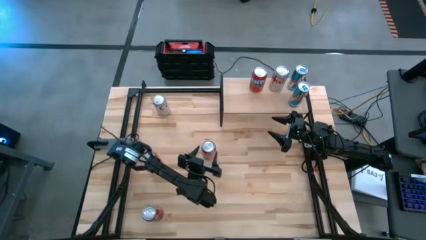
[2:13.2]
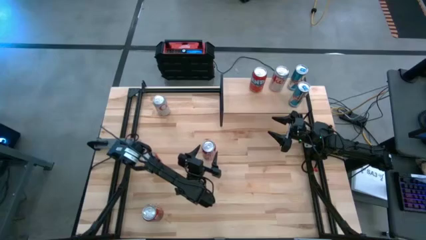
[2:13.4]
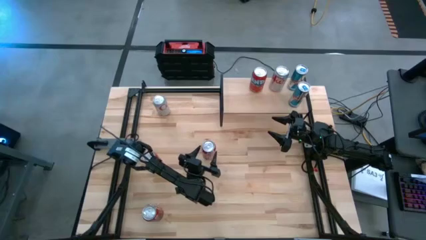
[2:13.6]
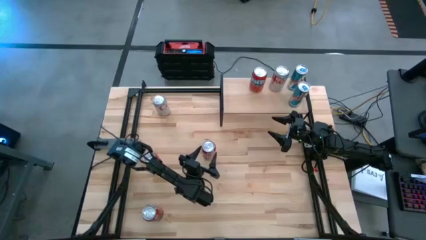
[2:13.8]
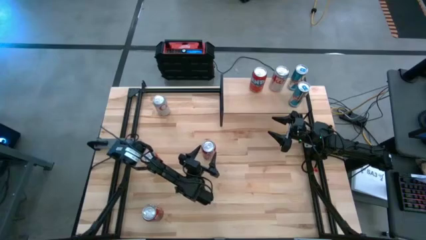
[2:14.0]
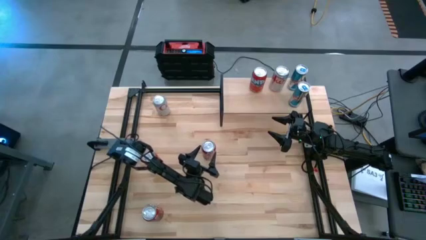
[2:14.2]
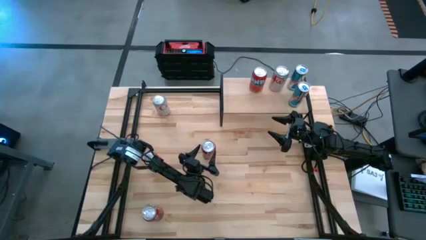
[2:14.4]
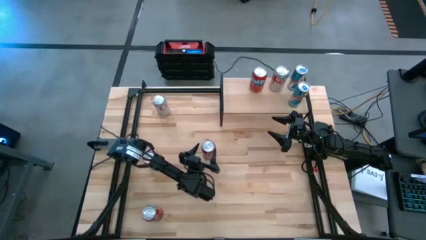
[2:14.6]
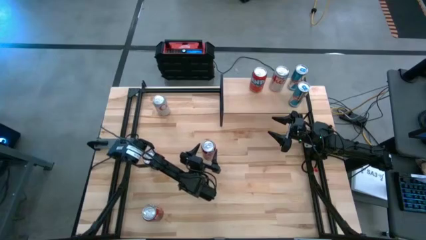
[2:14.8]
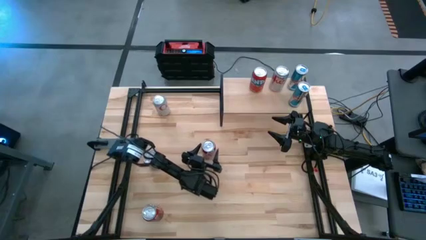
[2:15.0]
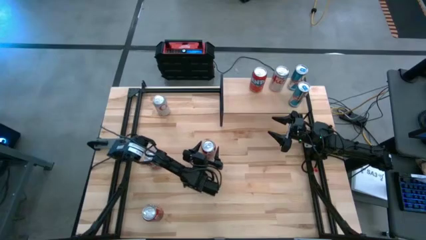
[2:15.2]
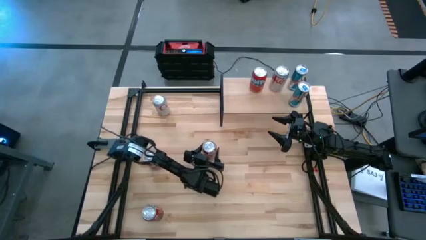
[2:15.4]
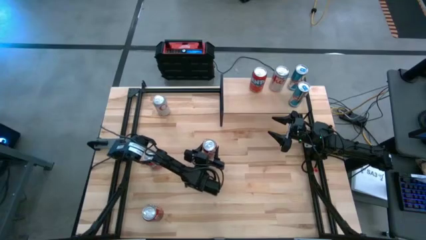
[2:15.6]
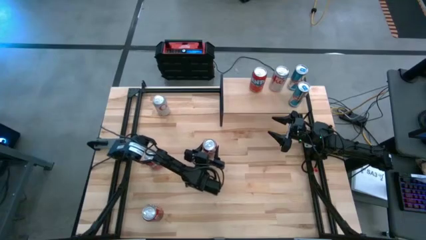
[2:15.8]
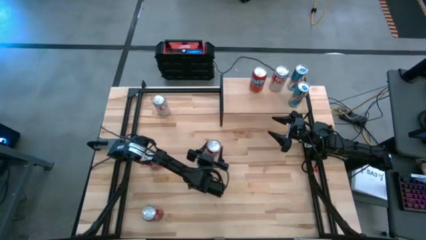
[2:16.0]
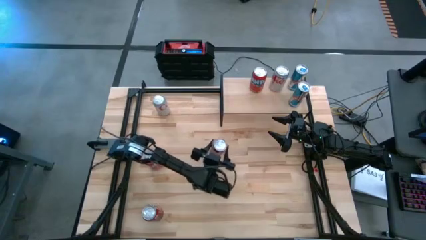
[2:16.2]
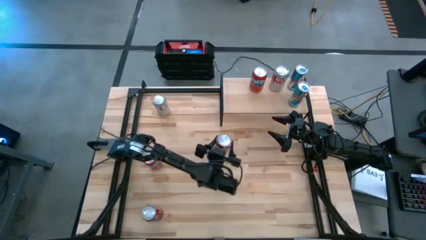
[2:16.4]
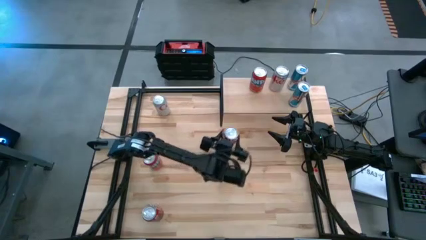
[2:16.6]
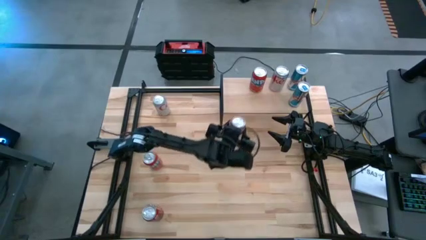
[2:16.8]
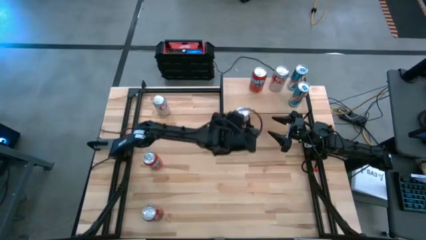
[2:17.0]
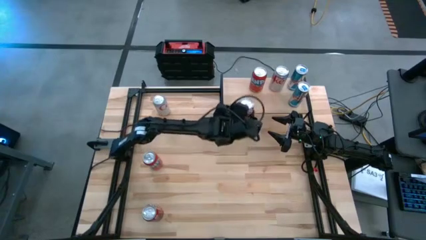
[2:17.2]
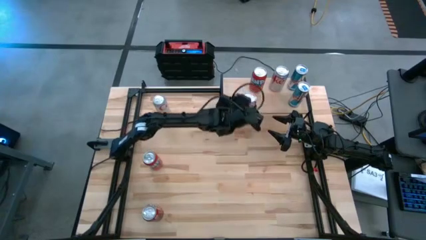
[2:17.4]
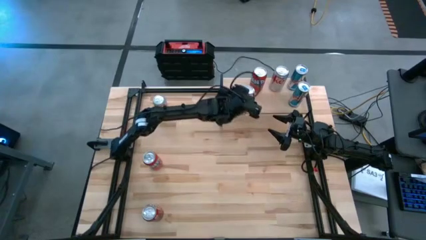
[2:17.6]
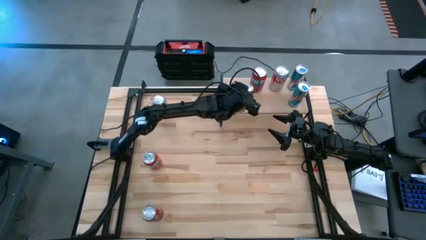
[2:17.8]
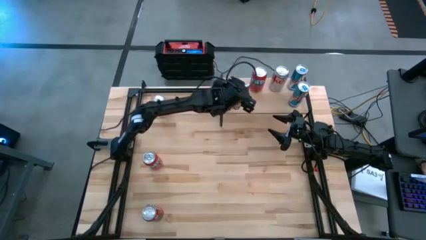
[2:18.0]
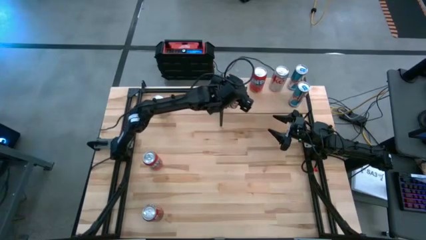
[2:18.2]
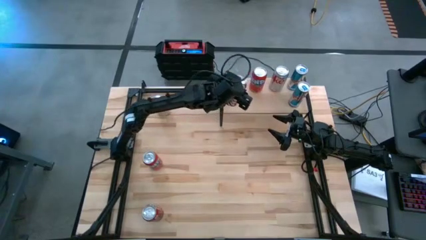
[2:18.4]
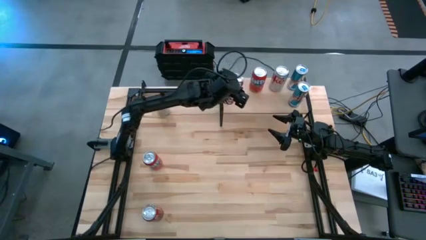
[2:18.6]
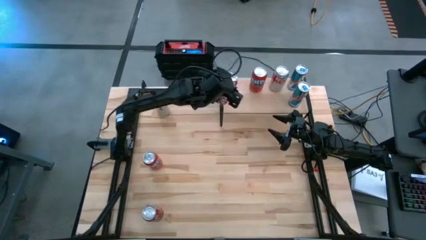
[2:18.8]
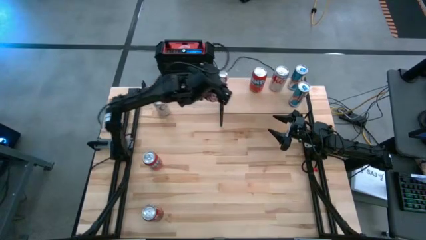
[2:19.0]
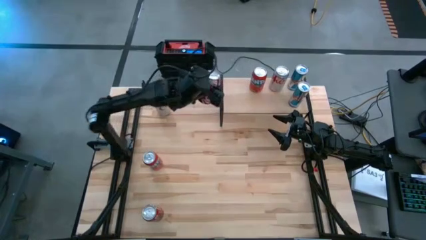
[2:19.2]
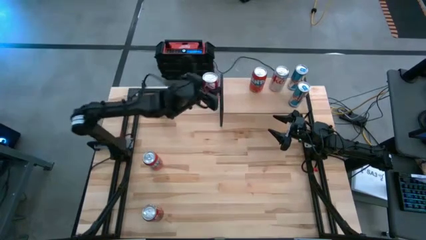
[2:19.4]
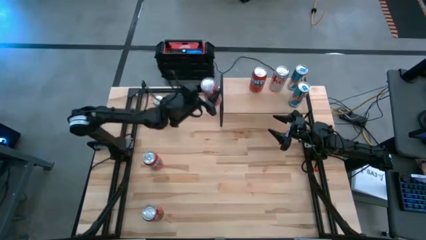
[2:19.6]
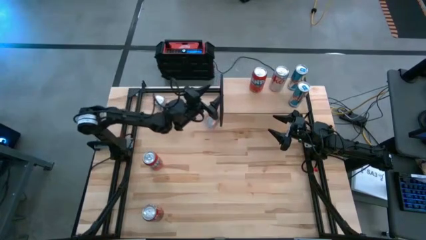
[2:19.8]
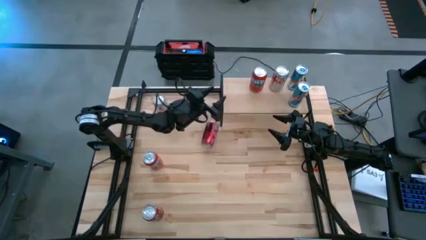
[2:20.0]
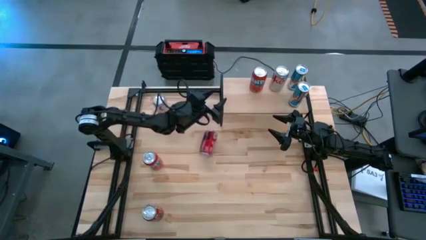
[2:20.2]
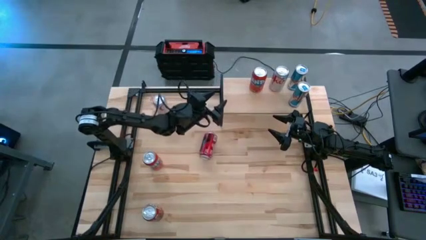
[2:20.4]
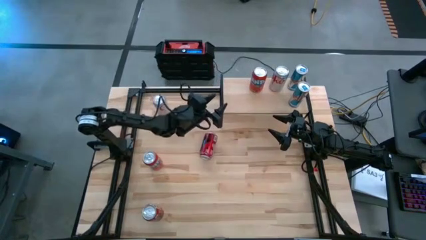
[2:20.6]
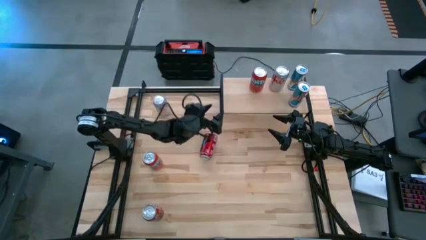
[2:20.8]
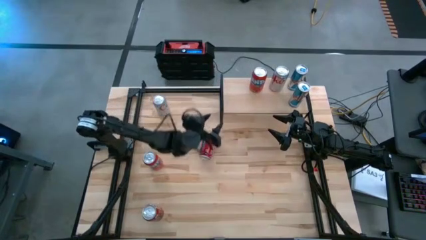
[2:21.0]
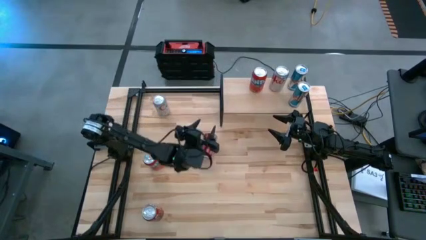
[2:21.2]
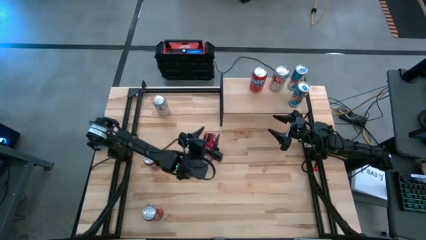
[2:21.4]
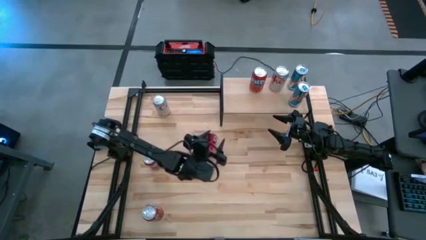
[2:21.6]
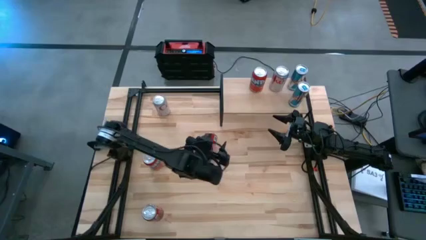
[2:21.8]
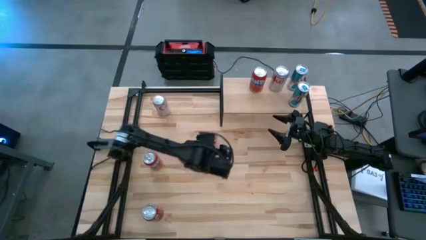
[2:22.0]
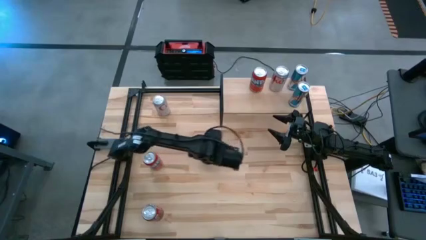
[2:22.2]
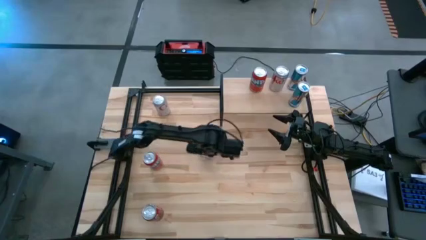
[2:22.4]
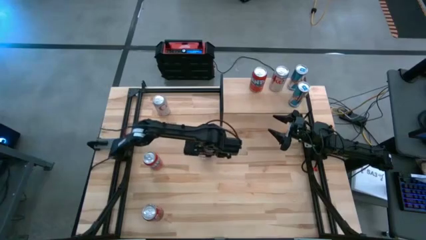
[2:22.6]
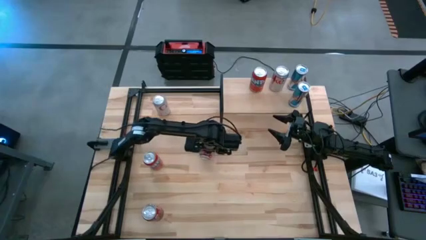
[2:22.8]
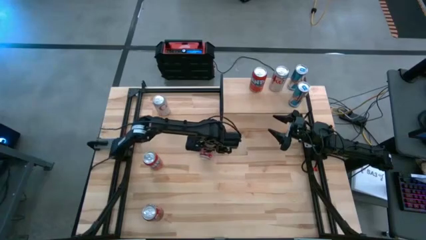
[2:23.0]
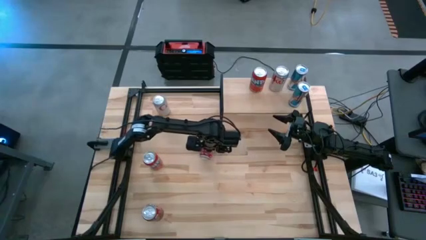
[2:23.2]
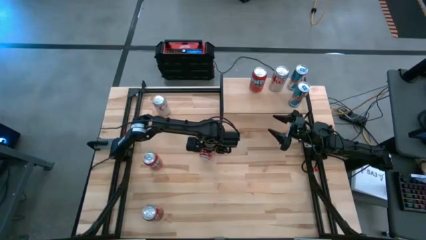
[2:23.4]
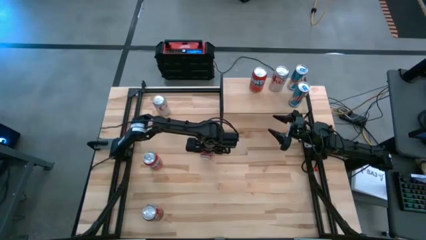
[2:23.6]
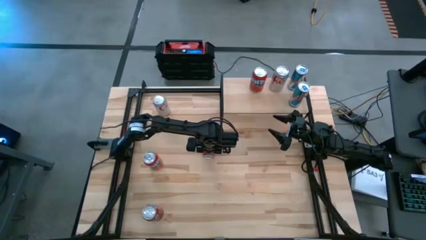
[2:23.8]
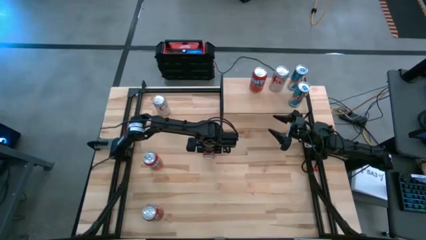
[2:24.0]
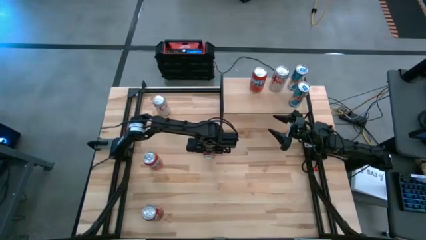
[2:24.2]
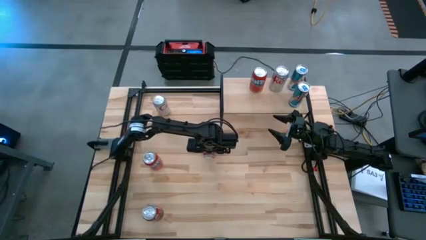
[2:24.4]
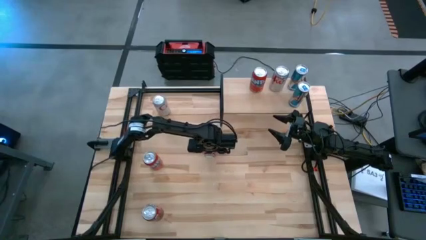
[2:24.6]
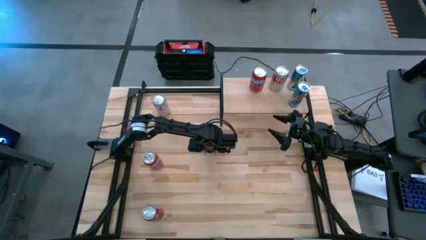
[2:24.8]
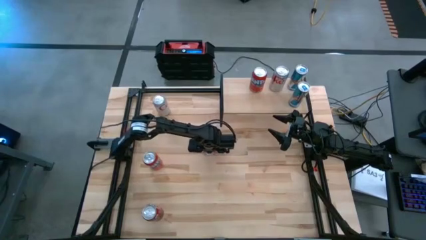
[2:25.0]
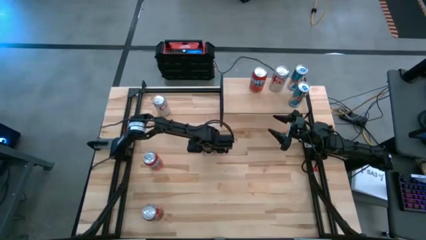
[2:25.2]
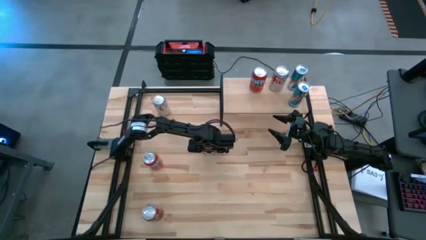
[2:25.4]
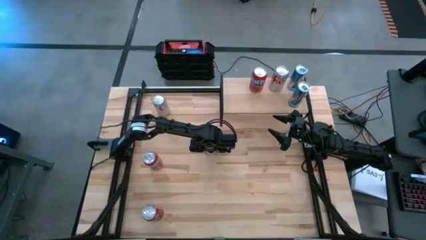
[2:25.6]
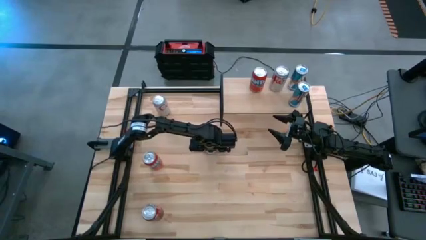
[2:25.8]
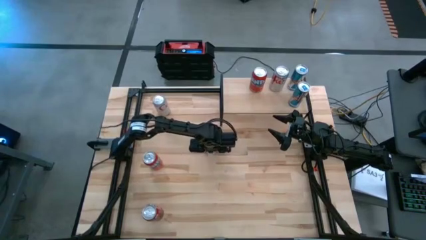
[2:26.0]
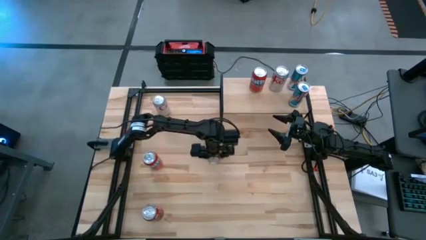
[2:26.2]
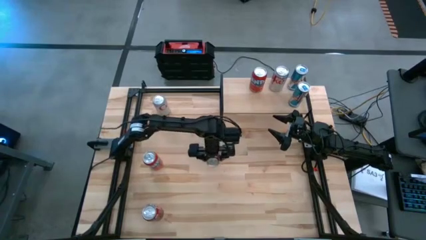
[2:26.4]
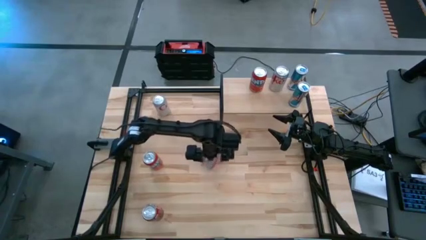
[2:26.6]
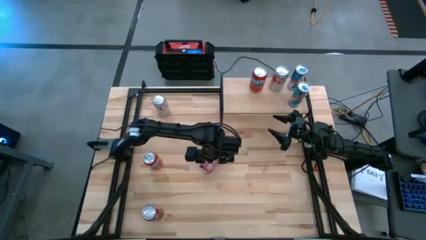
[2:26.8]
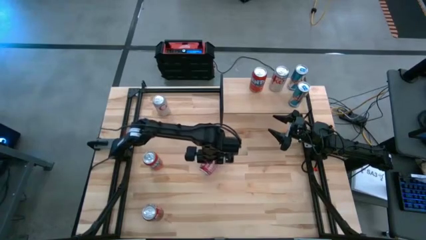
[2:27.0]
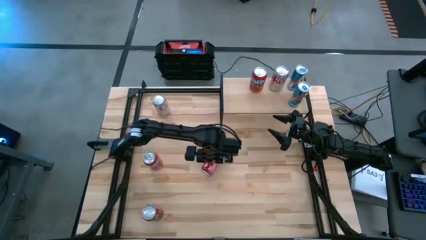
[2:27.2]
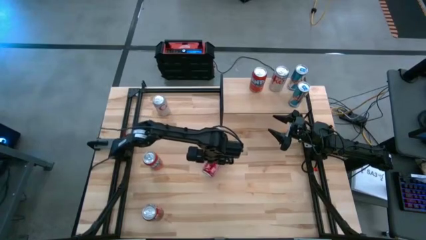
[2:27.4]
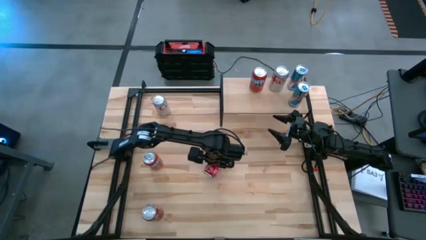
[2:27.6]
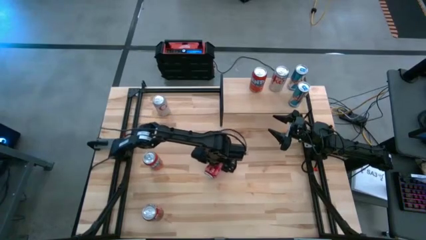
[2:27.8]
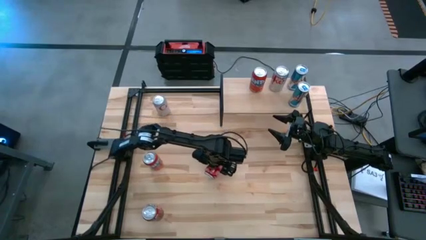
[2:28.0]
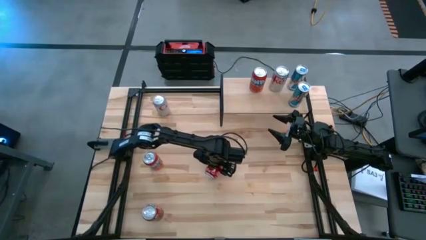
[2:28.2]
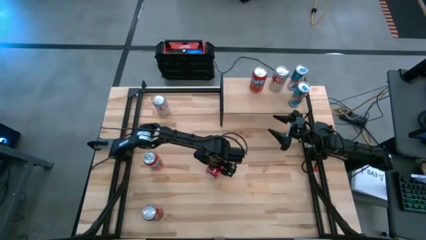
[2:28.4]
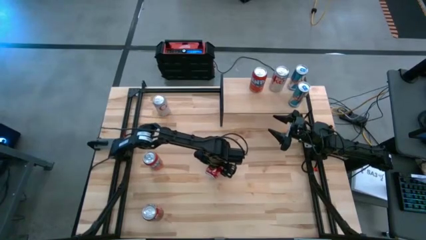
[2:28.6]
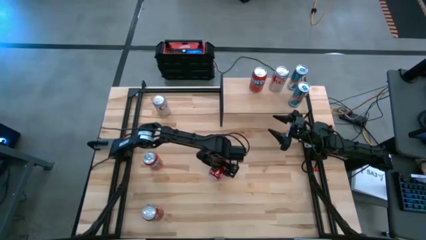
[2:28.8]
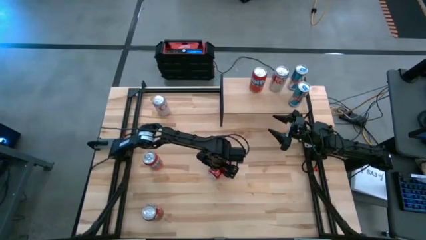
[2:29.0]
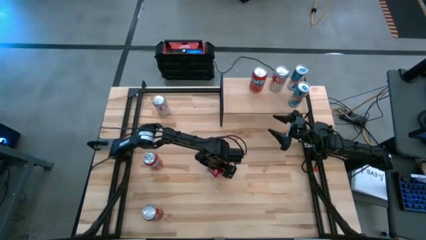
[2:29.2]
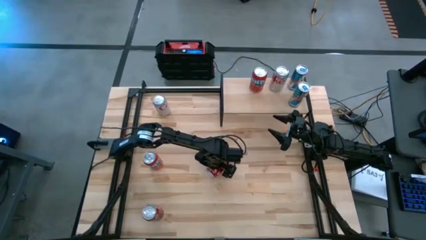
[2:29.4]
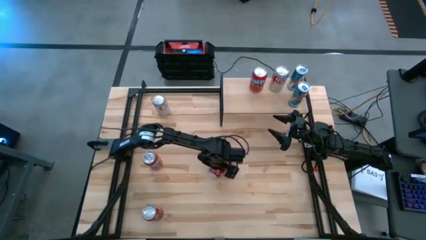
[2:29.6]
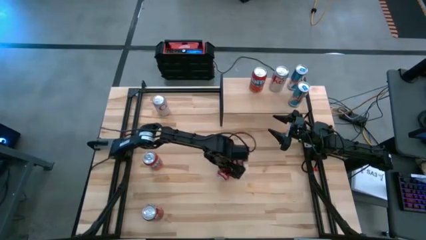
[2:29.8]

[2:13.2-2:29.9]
Task: Place canned beverage on shelf
Put the top red white soda can on the shelf

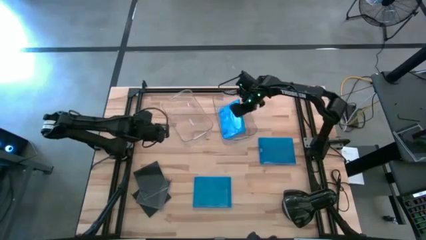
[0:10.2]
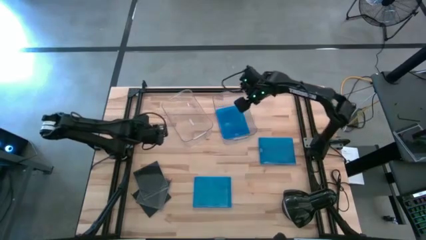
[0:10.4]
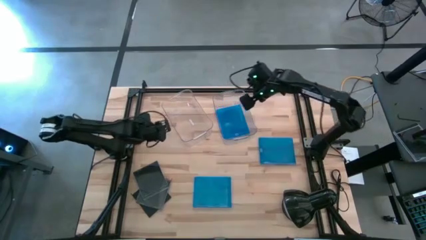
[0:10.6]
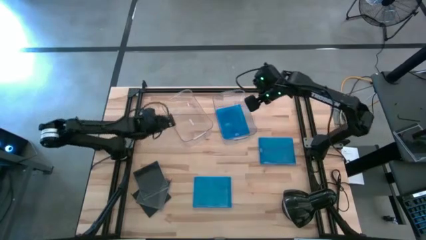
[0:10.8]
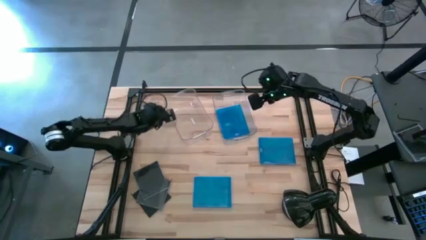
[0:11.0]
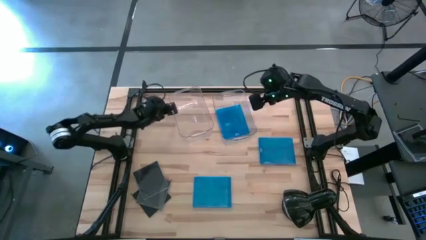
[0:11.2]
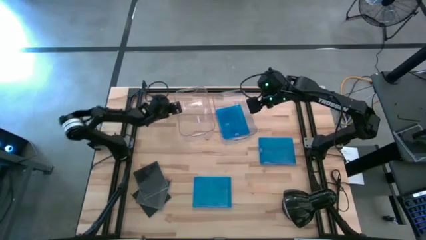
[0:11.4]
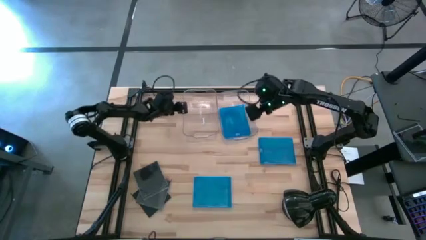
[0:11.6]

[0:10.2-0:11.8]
Task: Pick & place jewel cases by type
Adjust the left transparent bin
